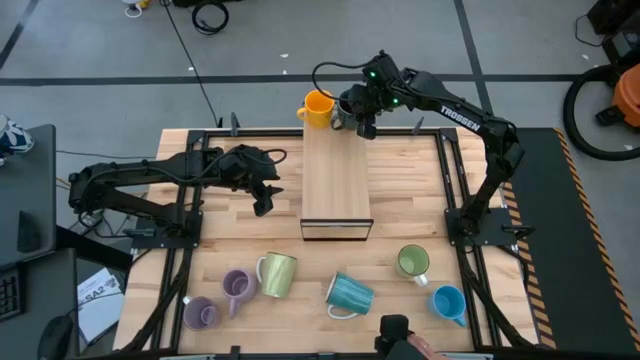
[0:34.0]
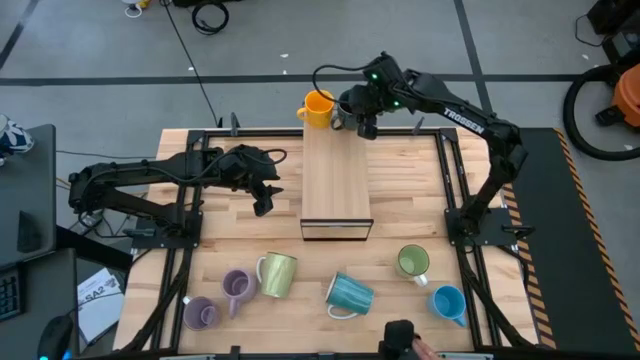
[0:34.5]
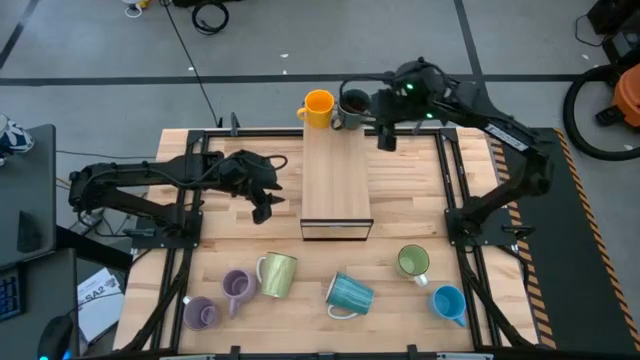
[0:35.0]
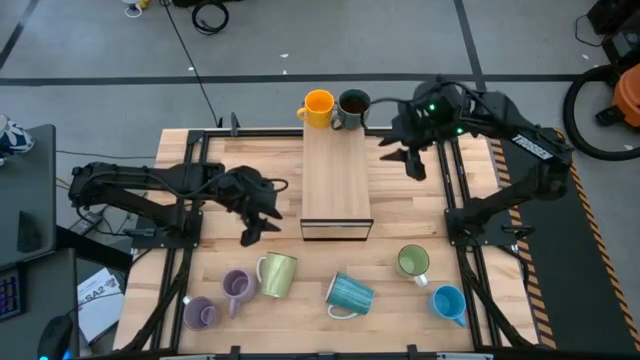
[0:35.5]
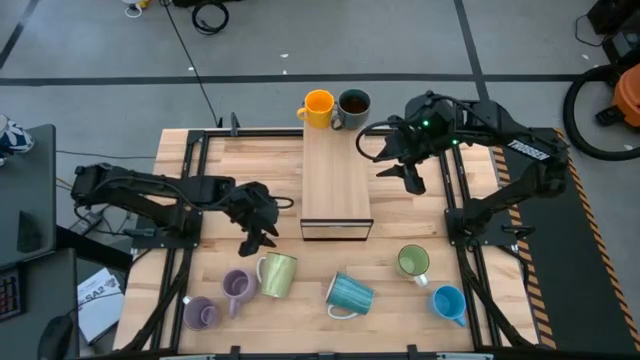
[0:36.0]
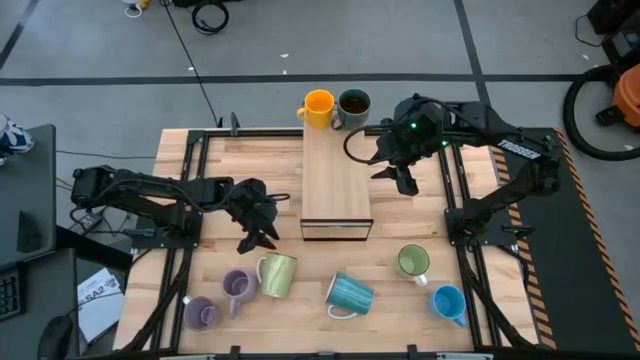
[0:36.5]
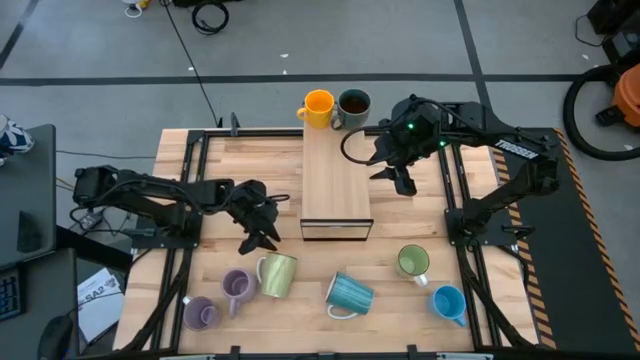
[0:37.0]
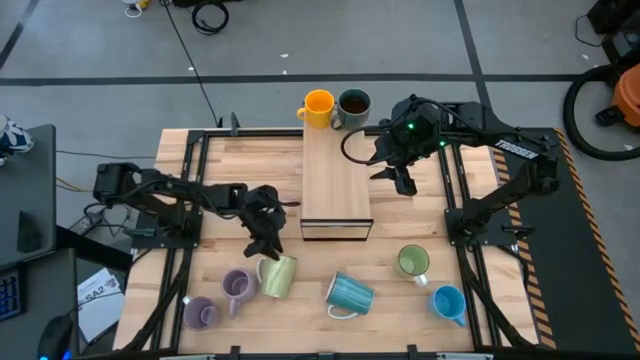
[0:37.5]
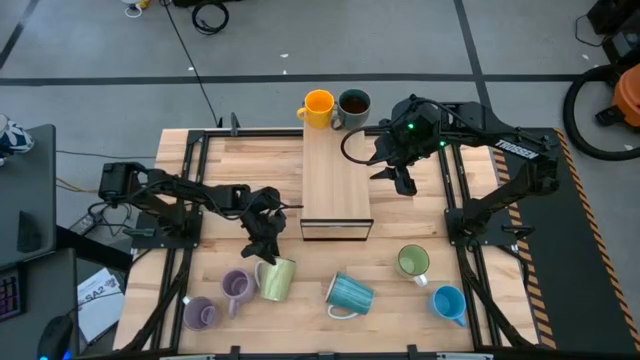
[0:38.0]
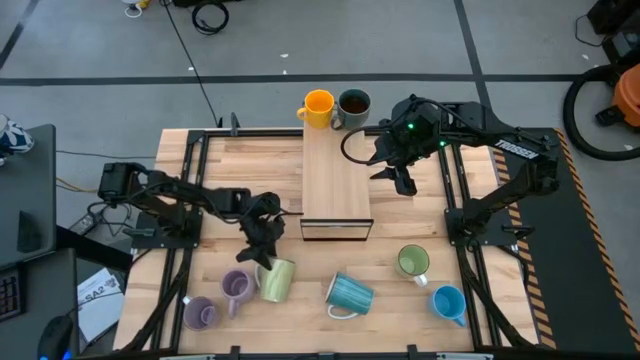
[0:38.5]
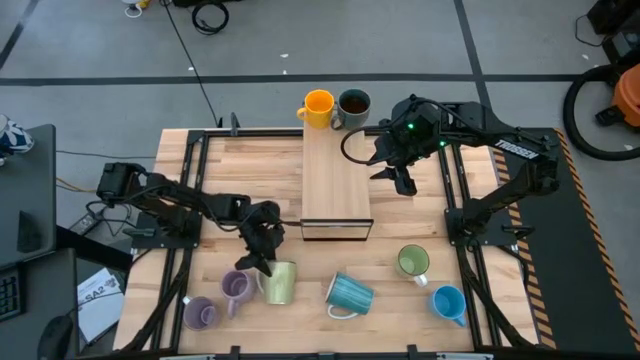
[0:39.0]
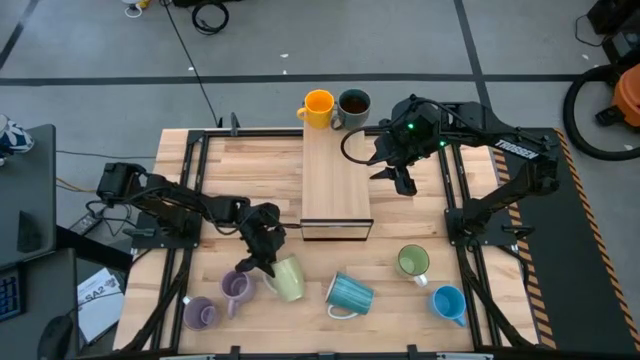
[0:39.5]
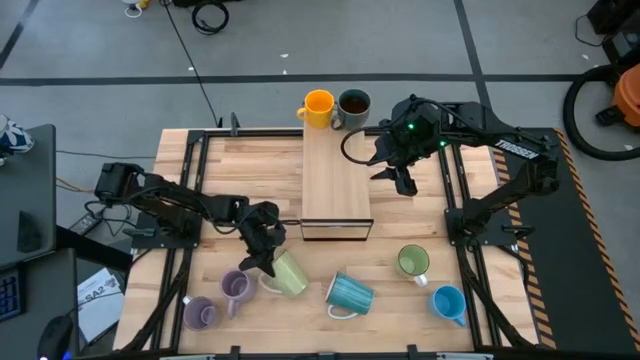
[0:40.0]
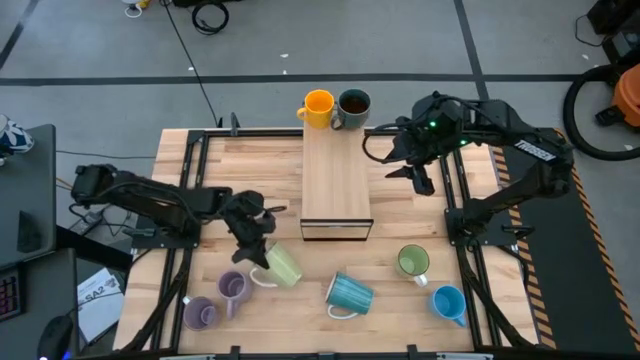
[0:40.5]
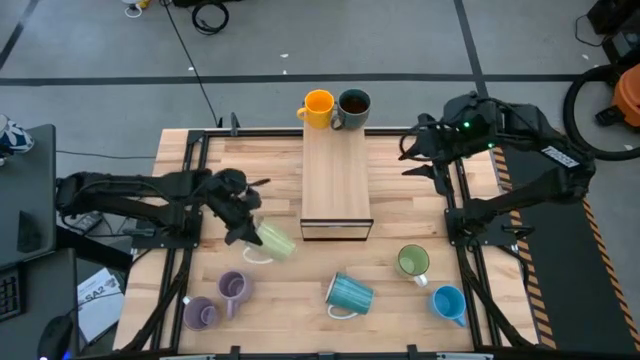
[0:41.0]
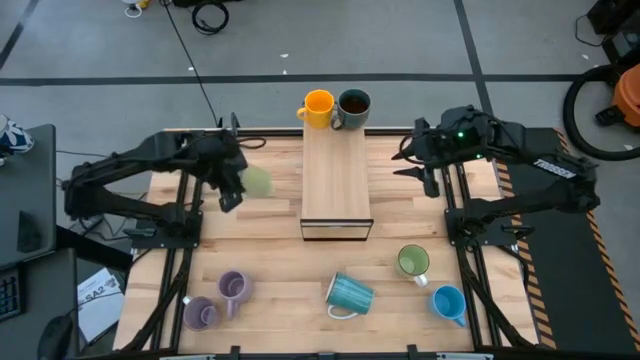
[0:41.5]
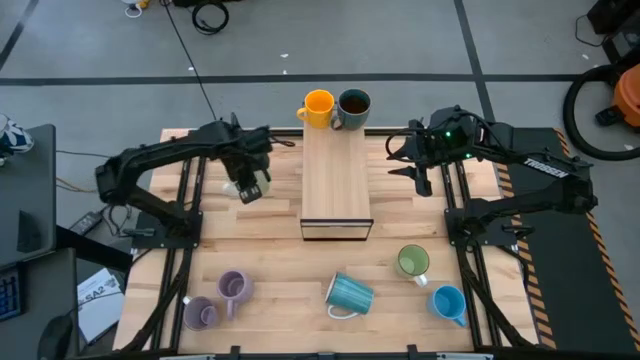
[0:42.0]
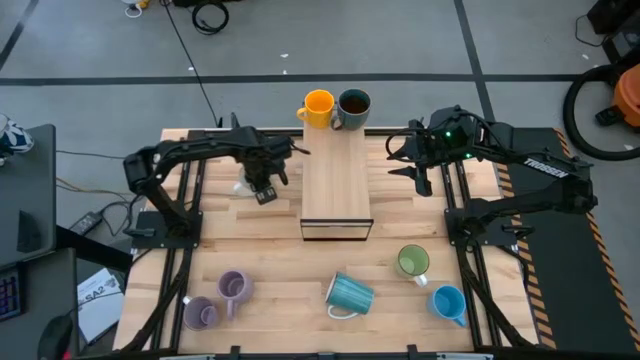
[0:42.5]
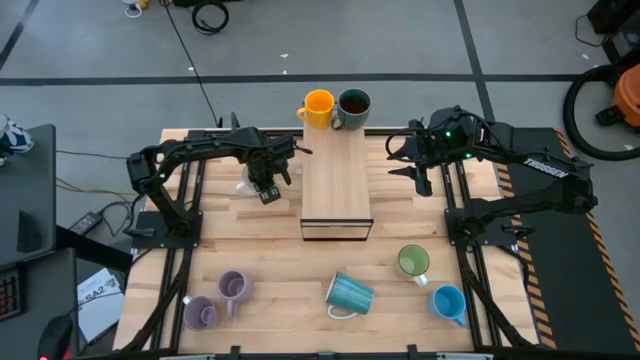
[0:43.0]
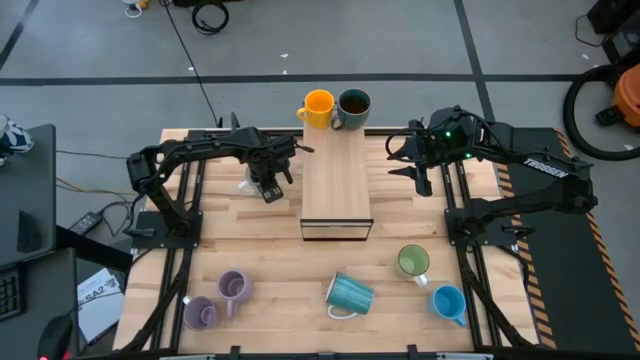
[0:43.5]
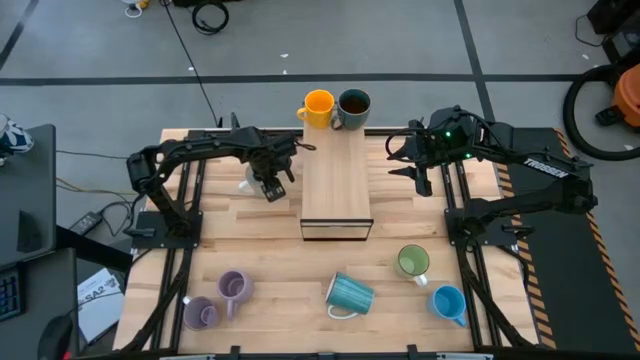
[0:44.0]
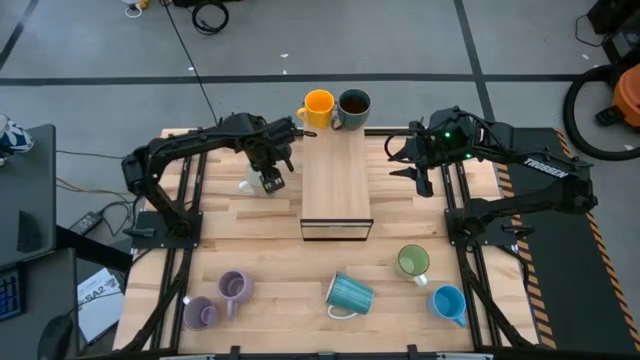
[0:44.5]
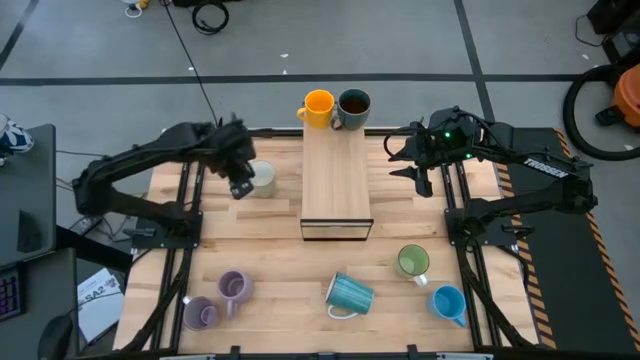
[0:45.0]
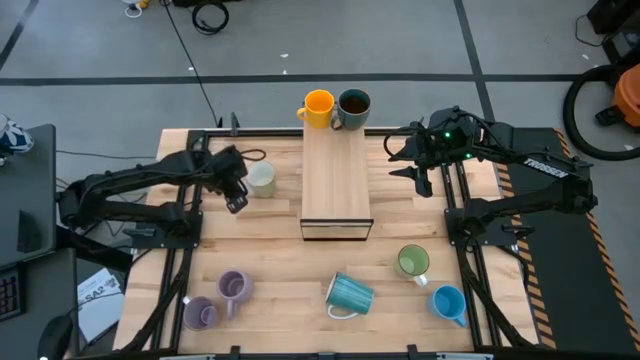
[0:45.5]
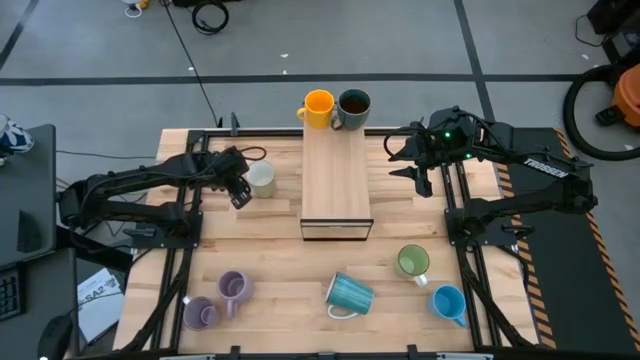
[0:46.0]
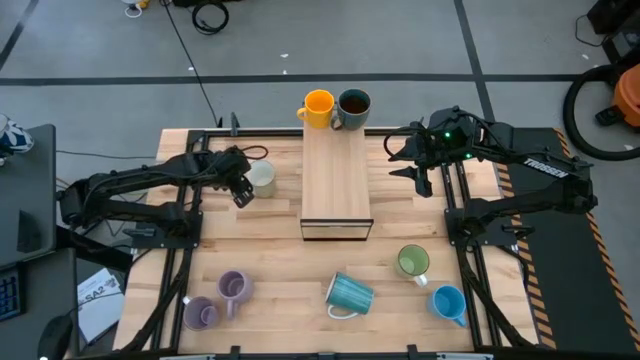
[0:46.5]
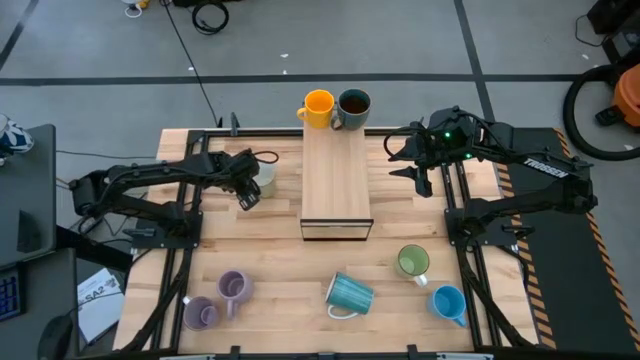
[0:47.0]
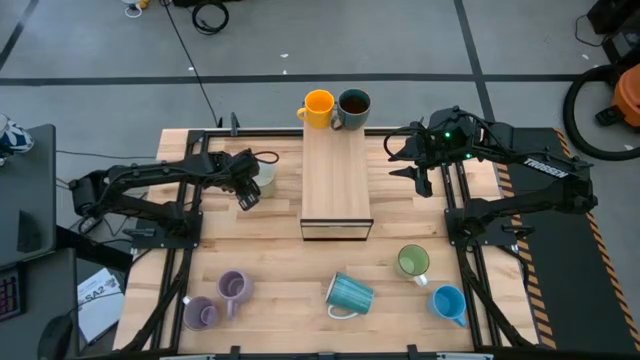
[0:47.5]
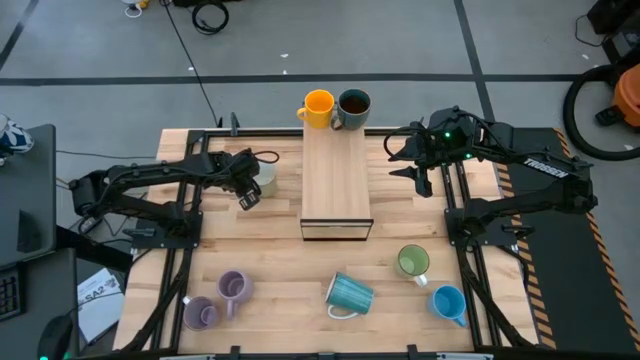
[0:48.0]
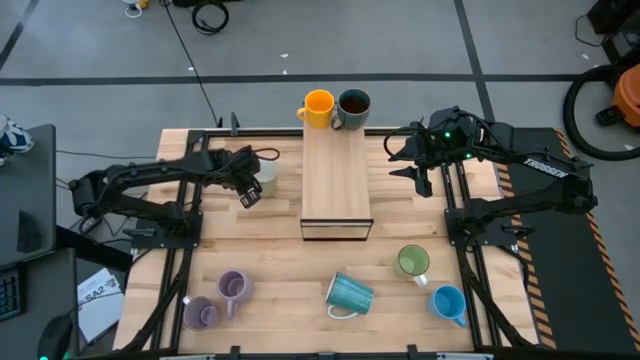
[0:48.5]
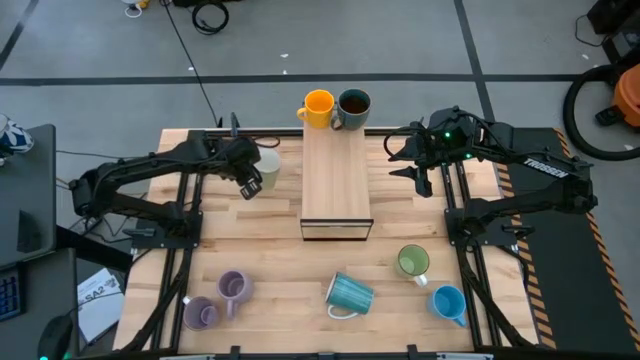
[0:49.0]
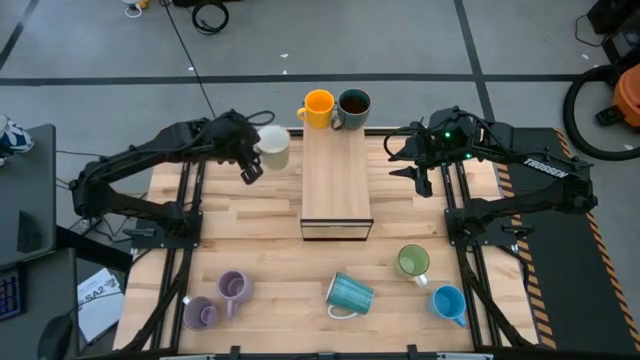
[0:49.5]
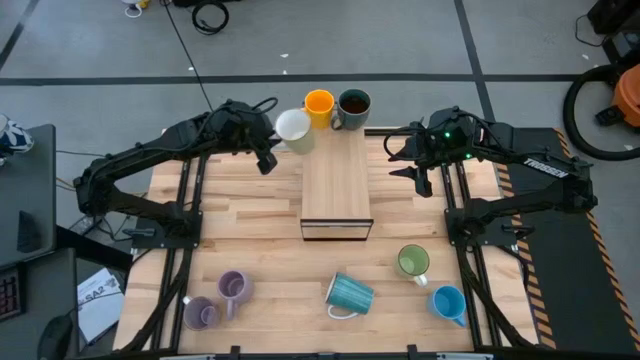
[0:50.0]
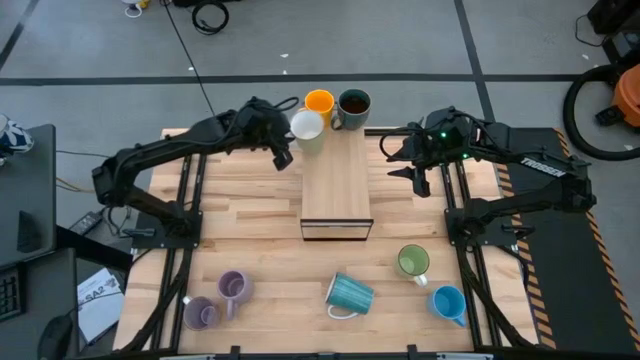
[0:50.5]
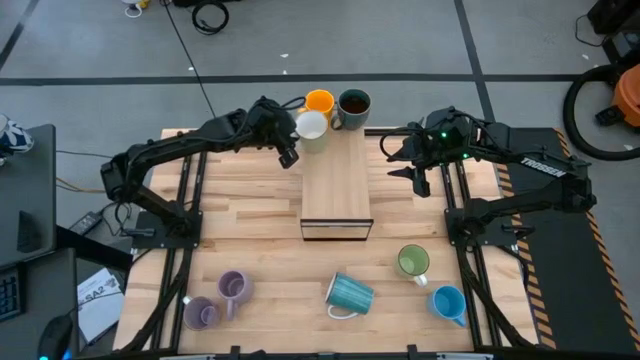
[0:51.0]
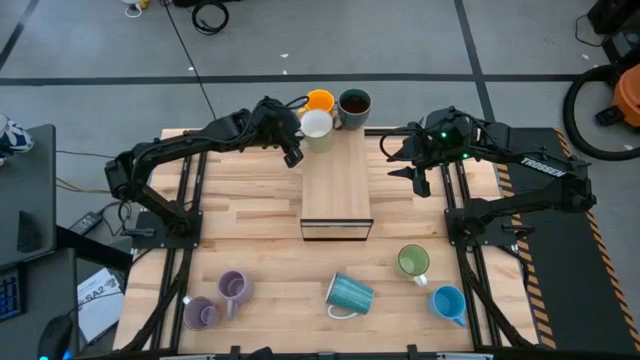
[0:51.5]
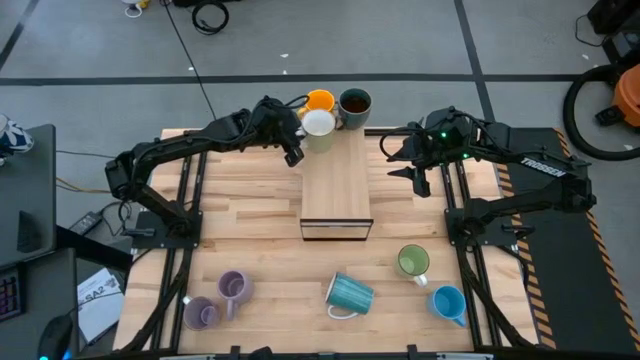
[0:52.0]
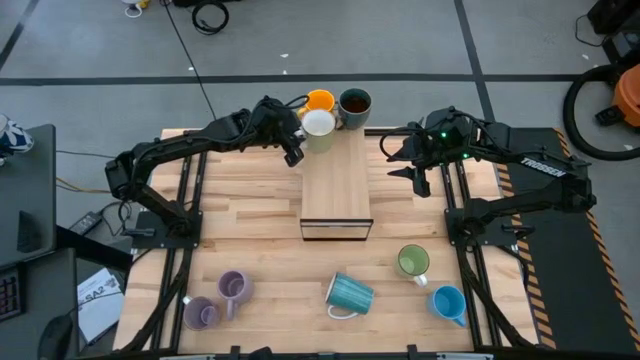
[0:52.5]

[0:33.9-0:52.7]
Task: Place coffee mugs
Put the left light green mug on the shelf
